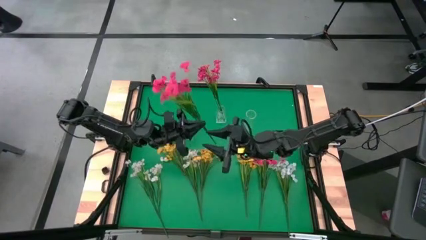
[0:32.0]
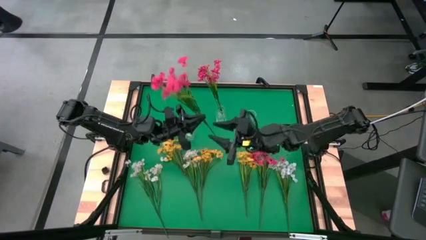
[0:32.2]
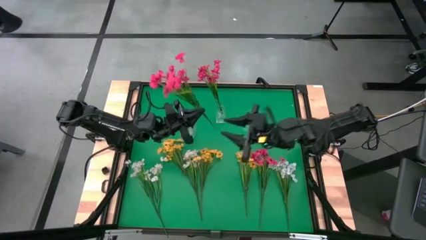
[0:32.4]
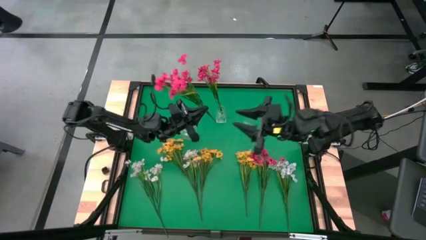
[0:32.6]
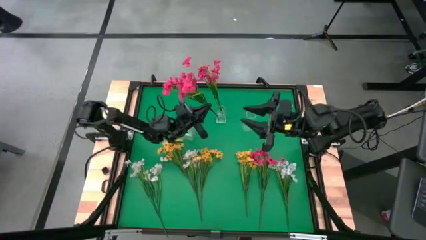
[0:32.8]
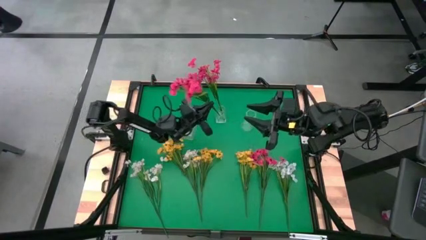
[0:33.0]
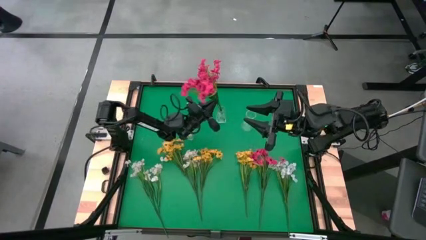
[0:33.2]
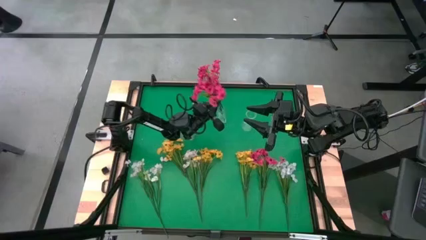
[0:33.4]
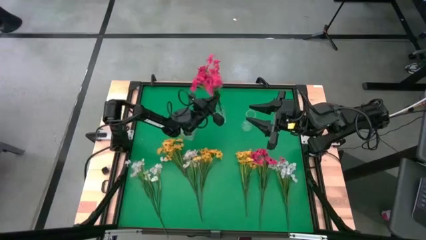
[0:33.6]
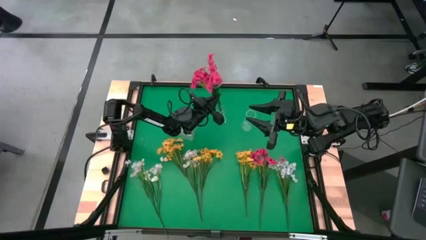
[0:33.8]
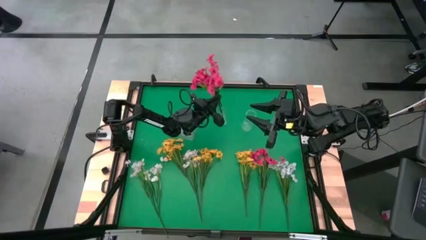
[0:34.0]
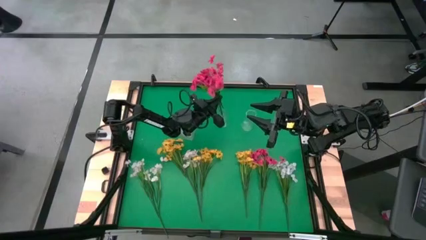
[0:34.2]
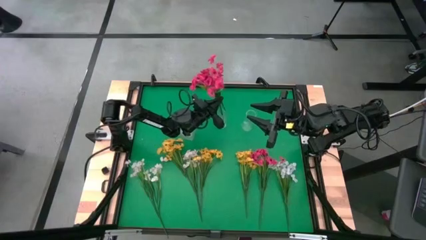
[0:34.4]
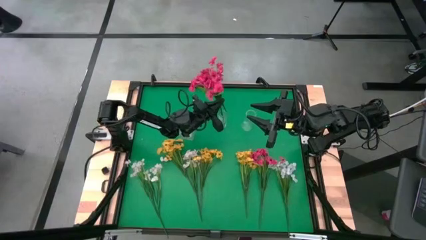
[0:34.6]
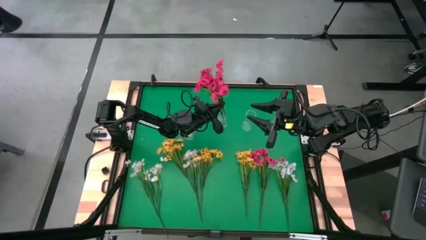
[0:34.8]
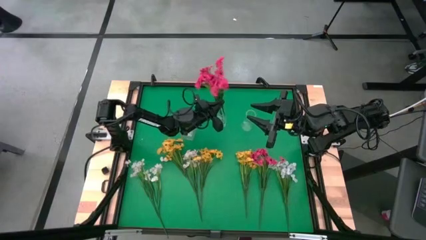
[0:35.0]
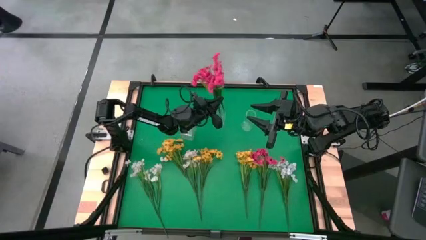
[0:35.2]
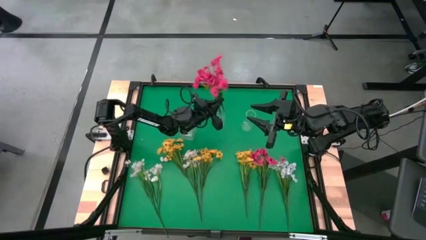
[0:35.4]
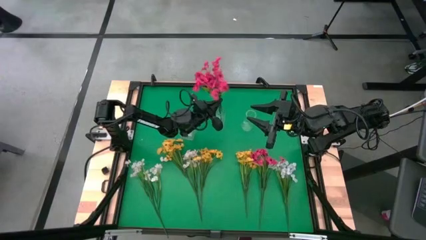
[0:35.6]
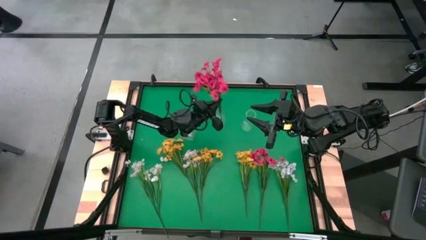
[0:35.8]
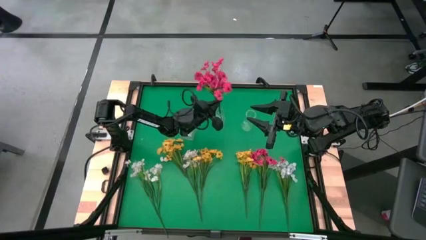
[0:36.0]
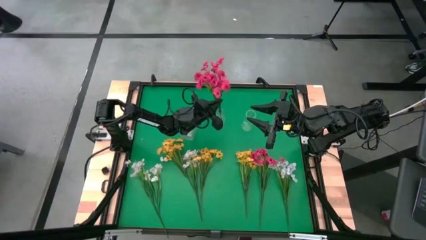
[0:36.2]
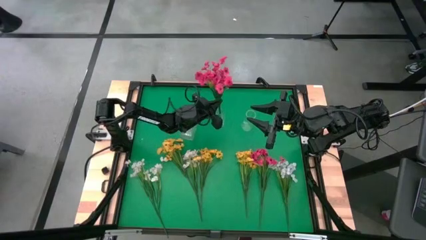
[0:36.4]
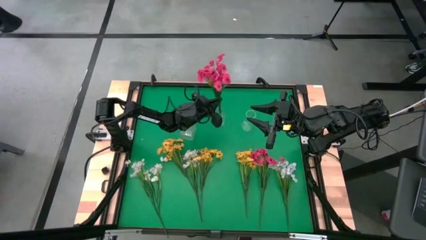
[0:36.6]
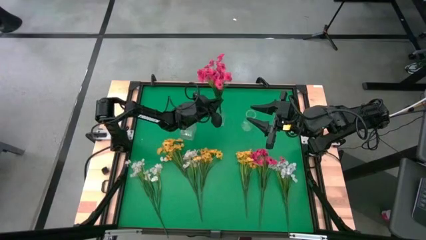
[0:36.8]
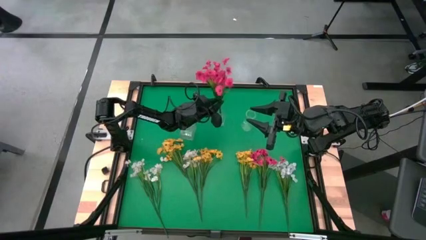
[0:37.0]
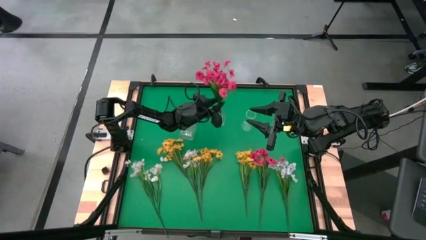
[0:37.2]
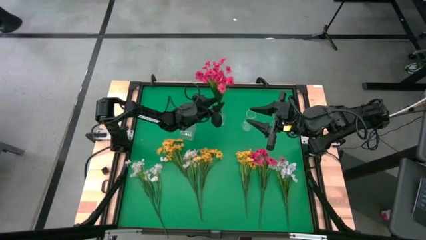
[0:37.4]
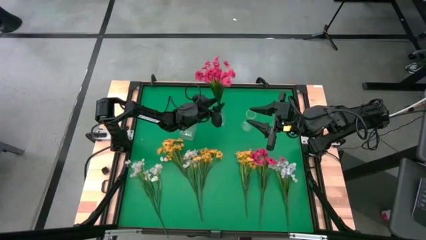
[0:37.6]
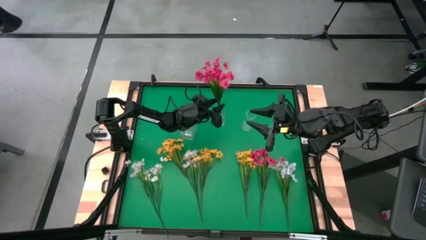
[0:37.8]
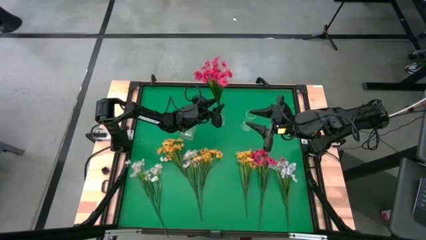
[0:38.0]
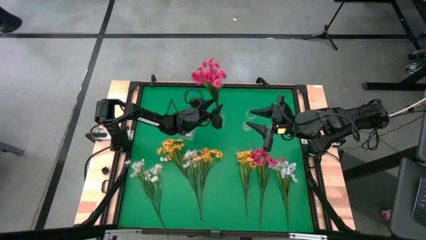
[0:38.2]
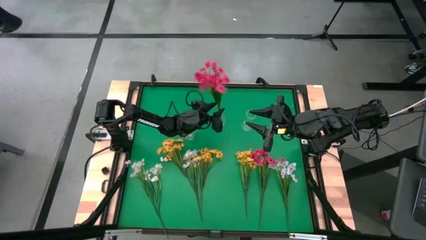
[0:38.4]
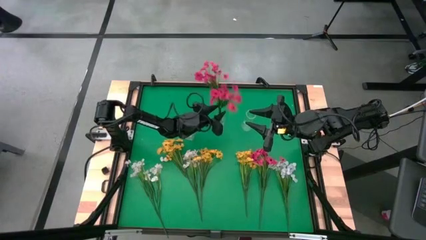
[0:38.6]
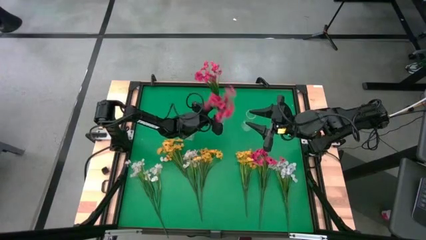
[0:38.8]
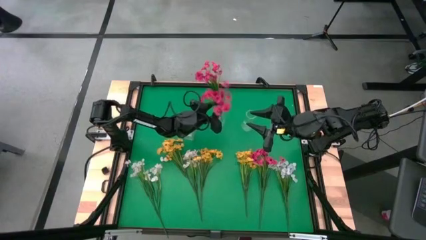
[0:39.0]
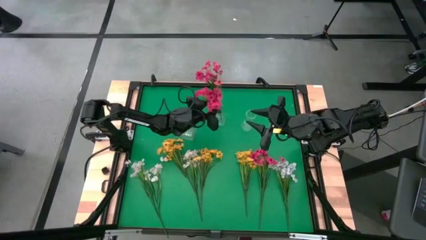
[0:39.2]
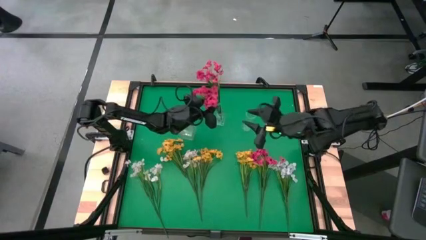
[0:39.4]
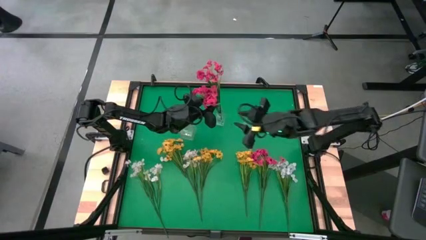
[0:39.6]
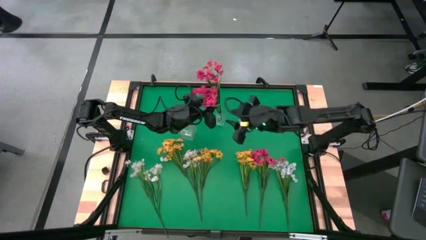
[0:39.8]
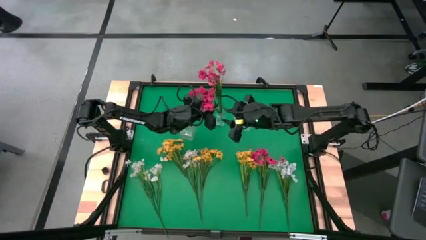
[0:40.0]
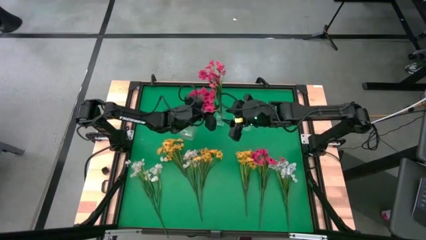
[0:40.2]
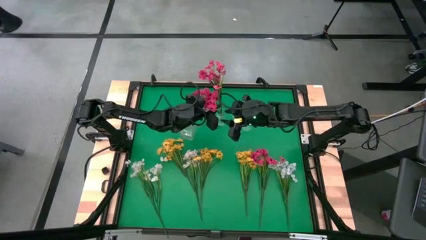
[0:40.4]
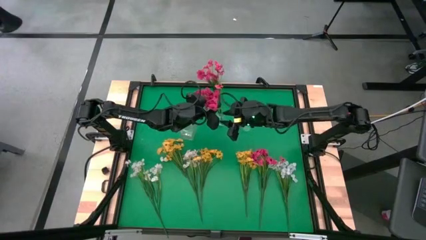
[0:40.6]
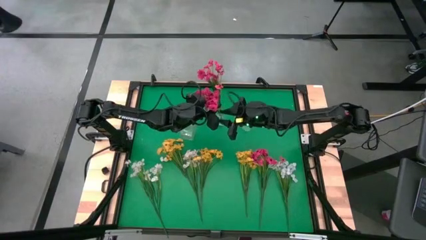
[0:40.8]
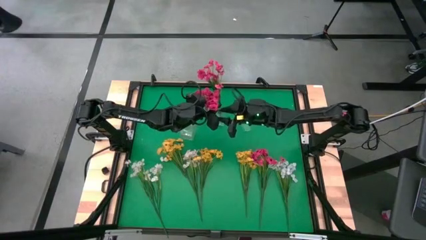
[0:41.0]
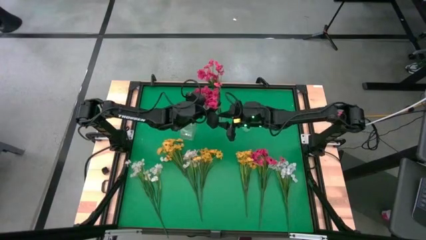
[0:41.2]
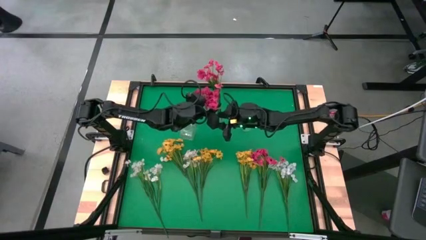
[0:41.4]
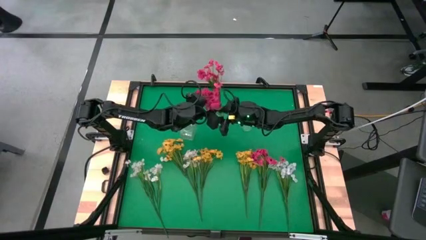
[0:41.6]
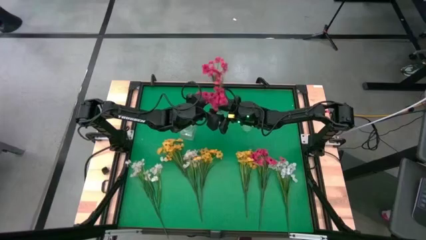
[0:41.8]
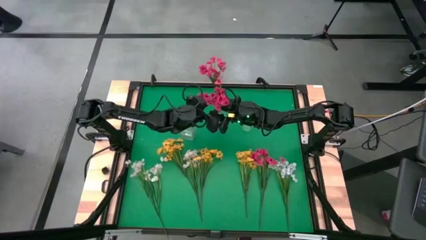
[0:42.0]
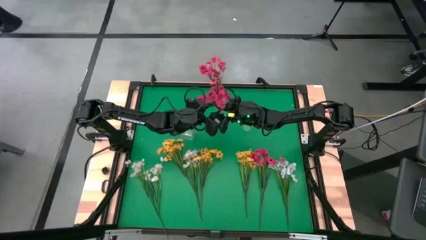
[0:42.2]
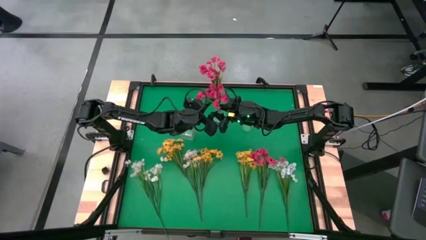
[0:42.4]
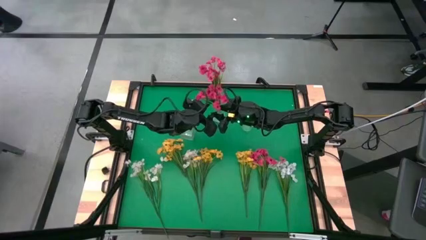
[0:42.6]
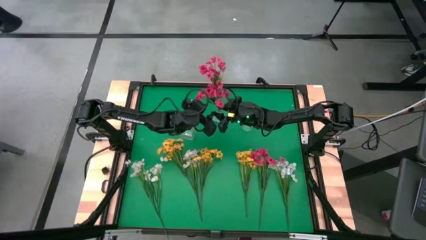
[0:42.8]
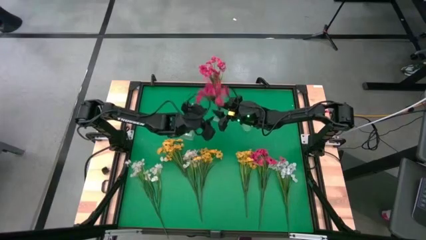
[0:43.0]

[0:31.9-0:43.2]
Task: Sort flowers into vase by color
Put the left red flower into the center transparent vase

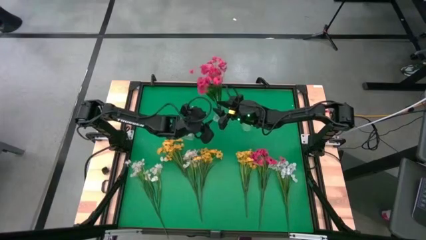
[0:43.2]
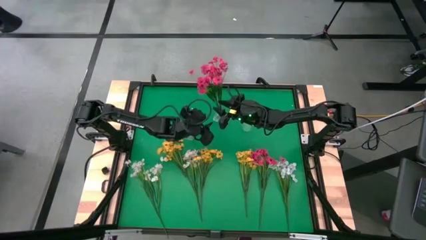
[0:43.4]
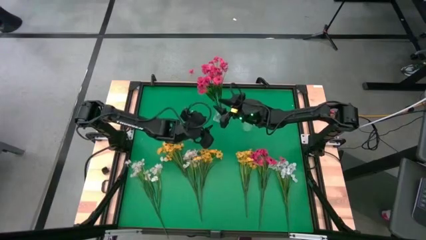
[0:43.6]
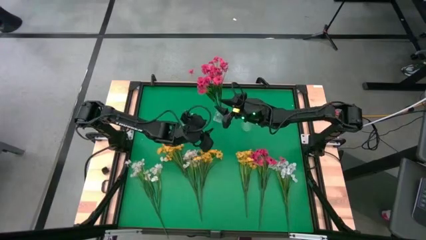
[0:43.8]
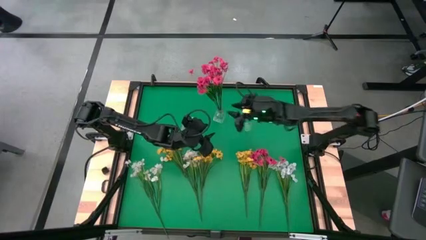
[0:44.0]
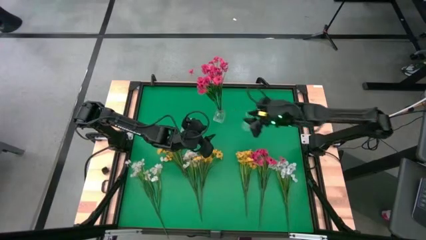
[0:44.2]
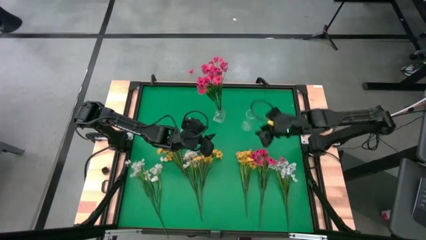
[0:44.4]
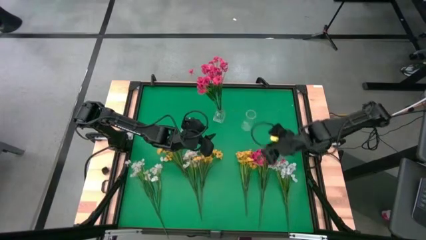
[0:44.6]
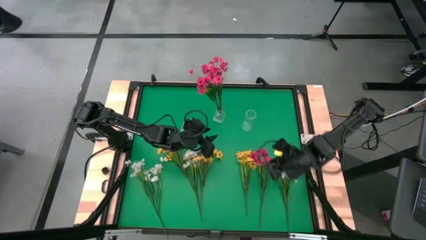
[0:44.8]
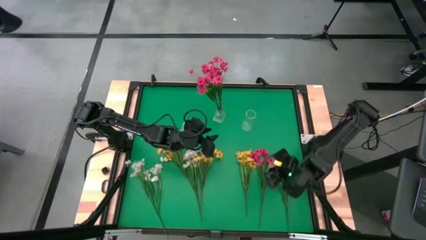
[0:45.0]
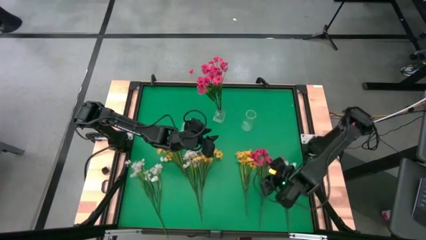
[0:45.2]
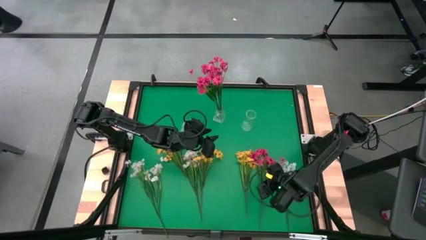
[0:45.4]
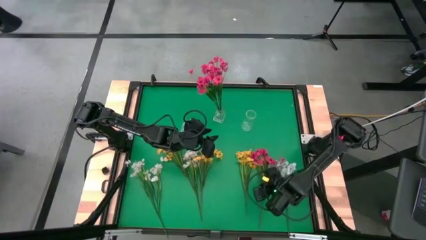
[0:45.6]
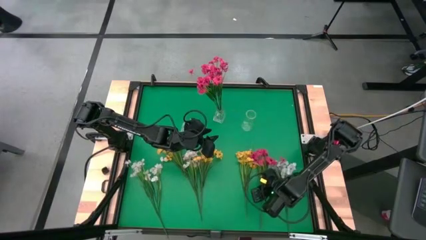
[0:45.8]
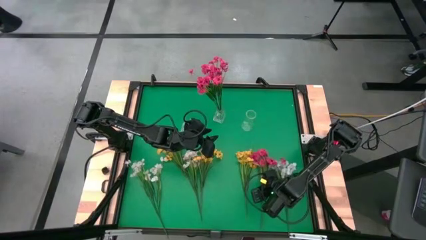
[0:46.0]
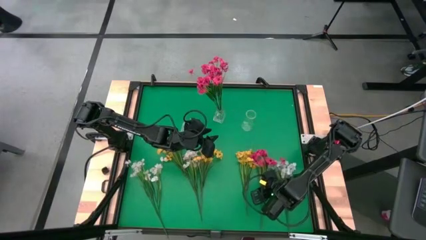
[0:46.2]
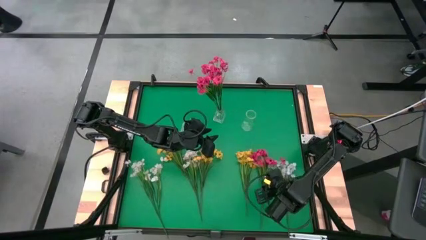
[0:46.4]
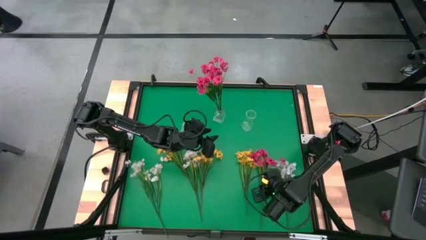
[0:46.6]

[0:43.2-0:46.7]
Put the red flower into the center transparent vase
